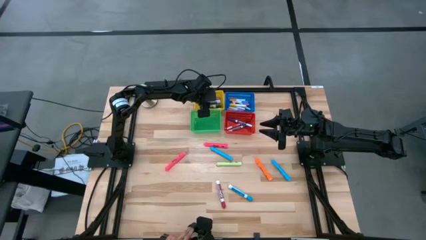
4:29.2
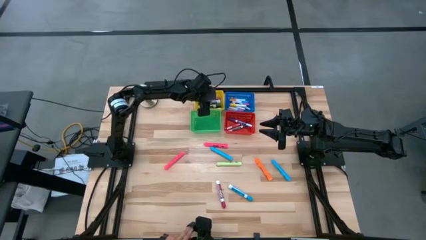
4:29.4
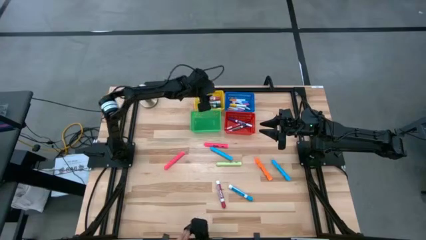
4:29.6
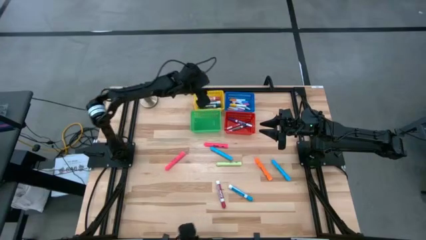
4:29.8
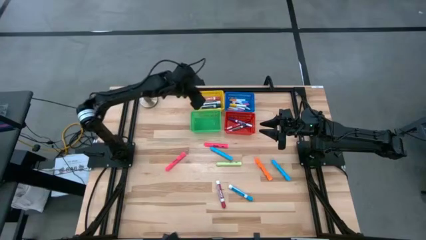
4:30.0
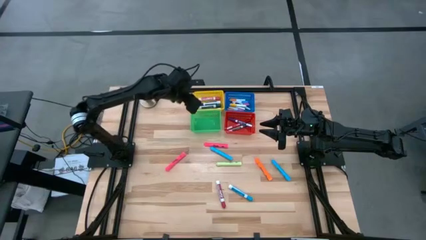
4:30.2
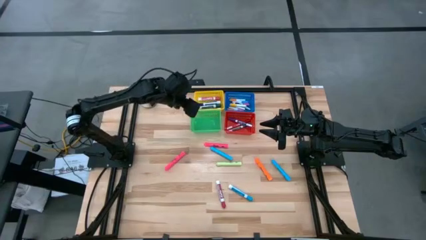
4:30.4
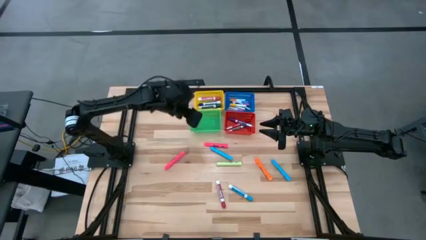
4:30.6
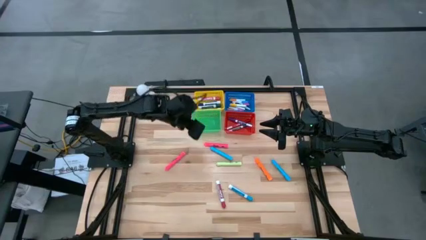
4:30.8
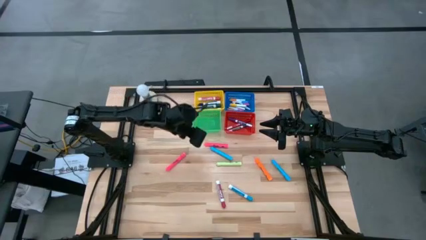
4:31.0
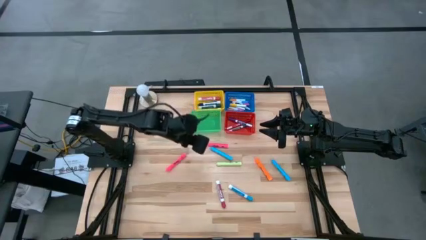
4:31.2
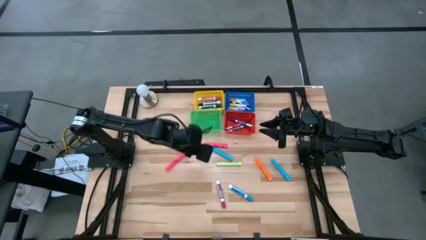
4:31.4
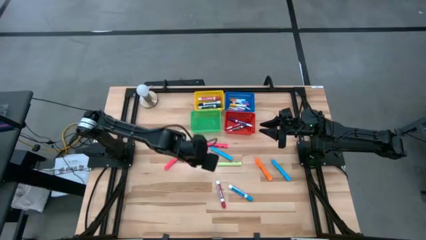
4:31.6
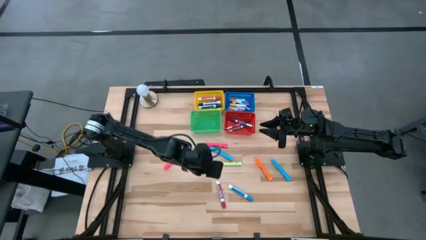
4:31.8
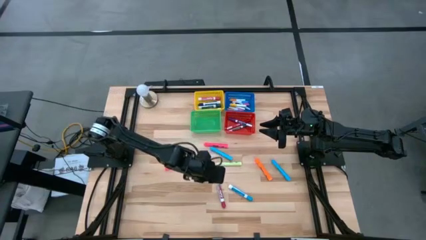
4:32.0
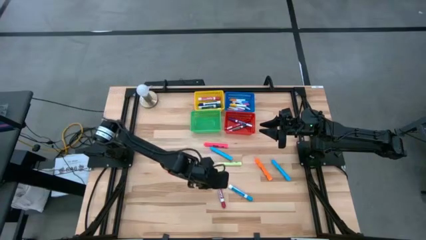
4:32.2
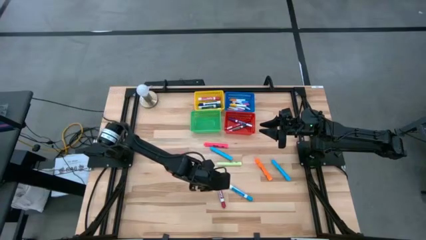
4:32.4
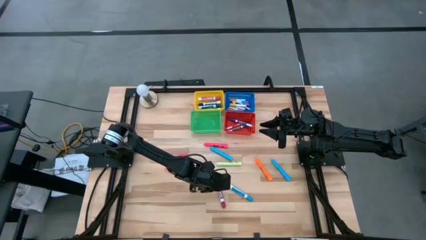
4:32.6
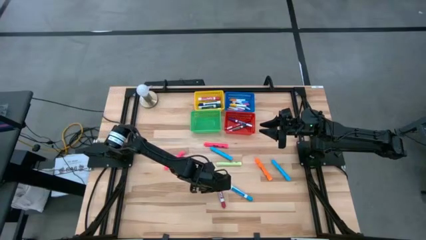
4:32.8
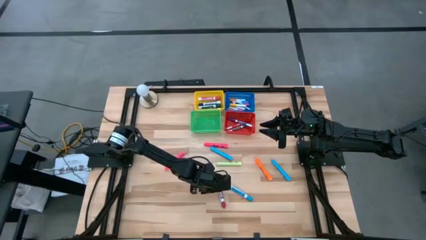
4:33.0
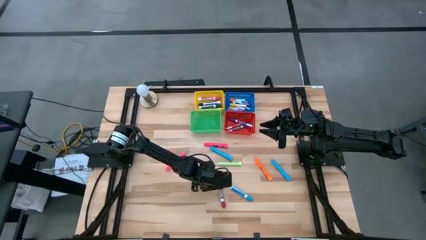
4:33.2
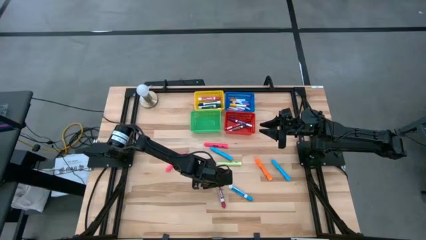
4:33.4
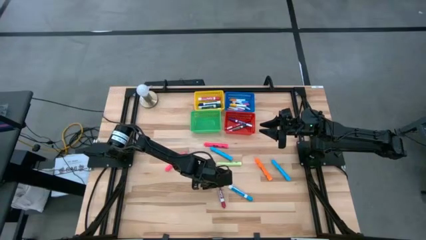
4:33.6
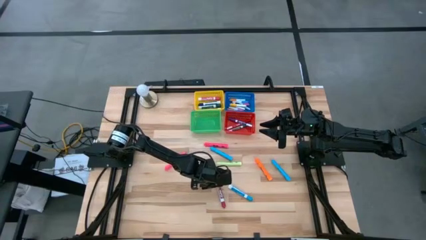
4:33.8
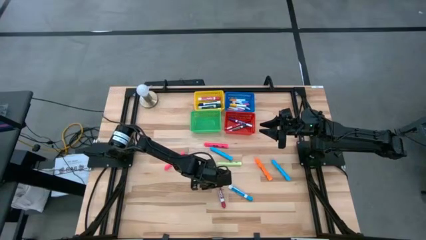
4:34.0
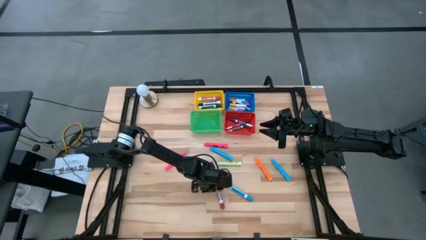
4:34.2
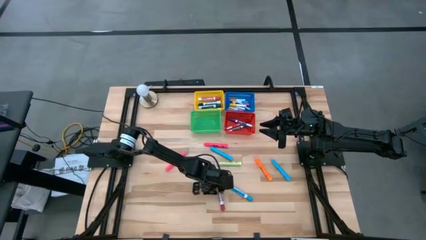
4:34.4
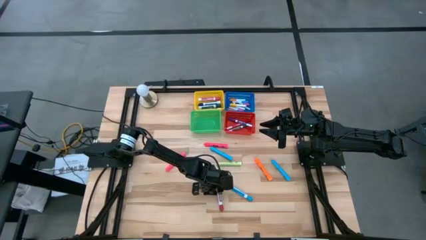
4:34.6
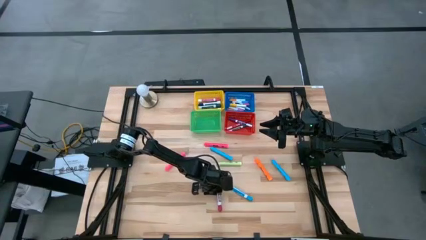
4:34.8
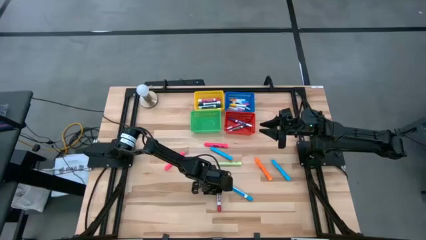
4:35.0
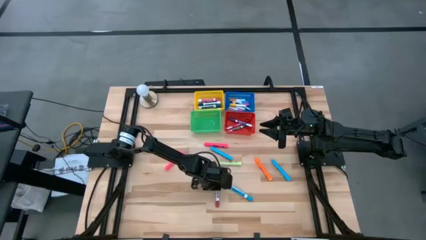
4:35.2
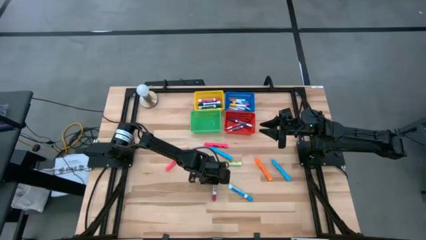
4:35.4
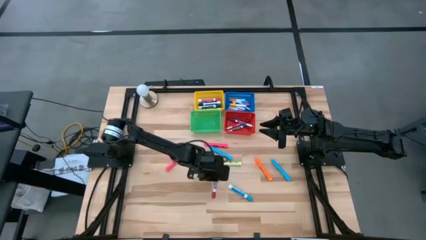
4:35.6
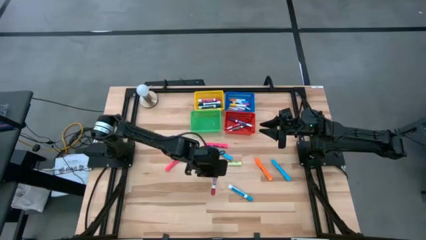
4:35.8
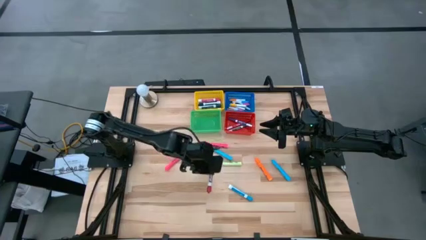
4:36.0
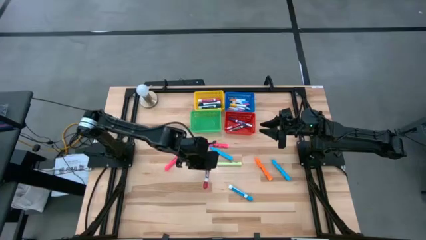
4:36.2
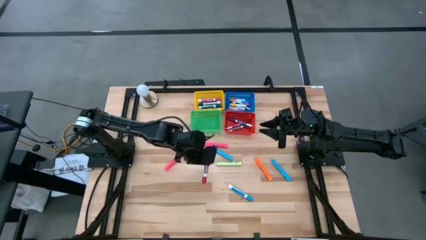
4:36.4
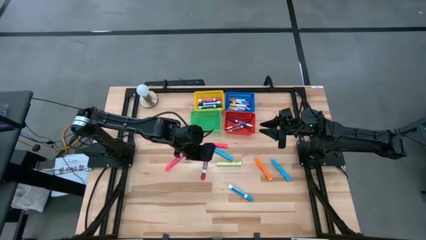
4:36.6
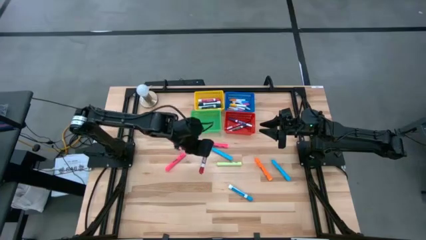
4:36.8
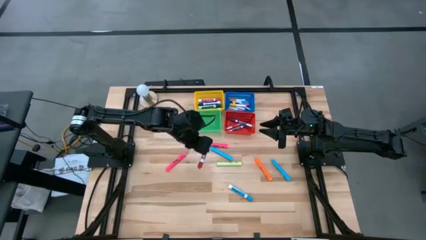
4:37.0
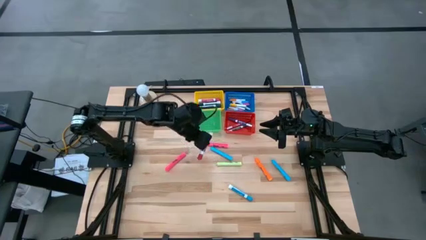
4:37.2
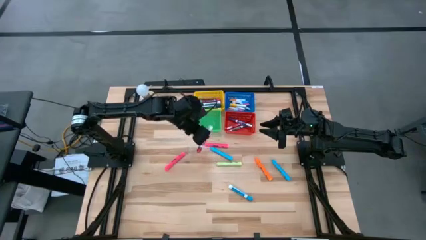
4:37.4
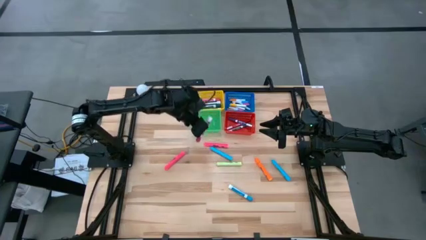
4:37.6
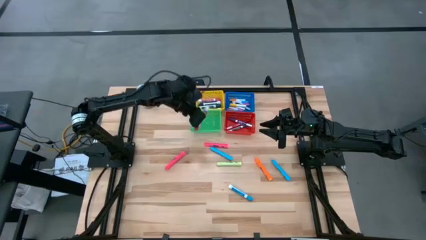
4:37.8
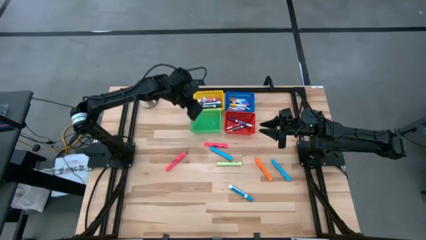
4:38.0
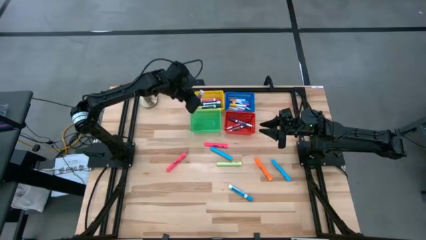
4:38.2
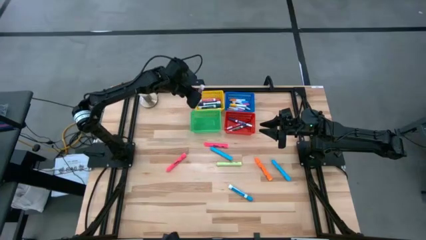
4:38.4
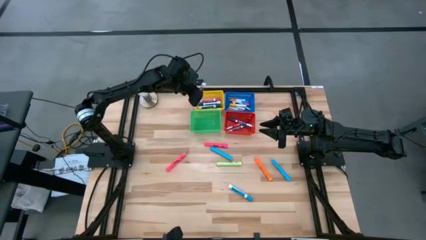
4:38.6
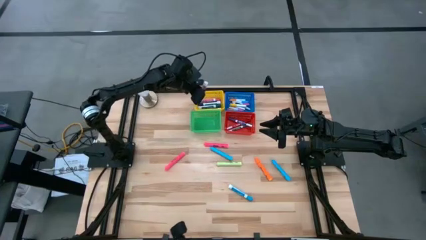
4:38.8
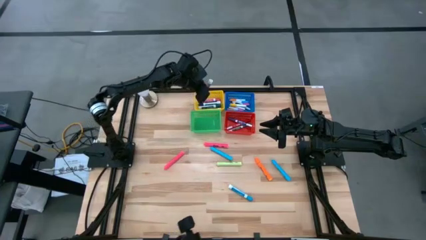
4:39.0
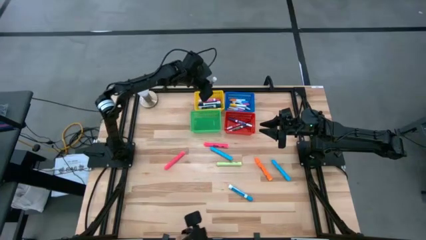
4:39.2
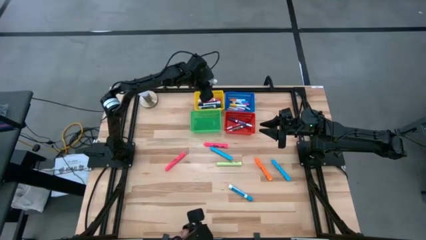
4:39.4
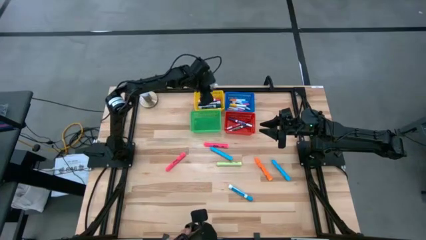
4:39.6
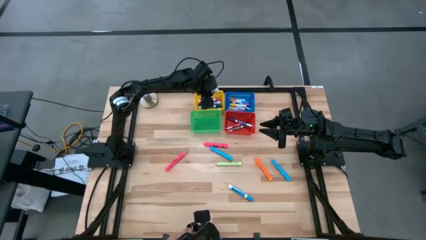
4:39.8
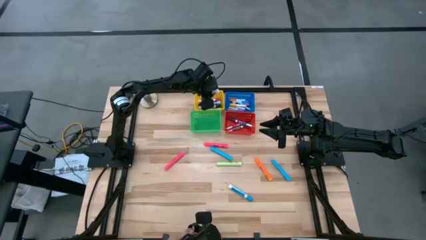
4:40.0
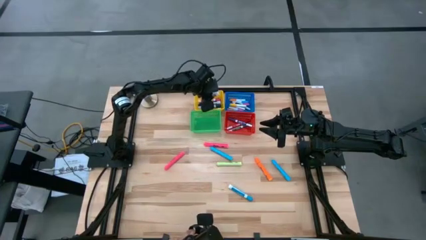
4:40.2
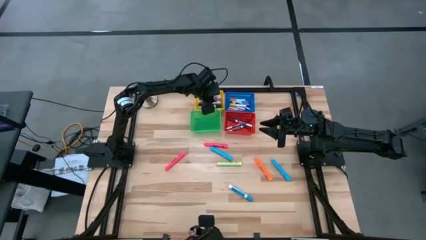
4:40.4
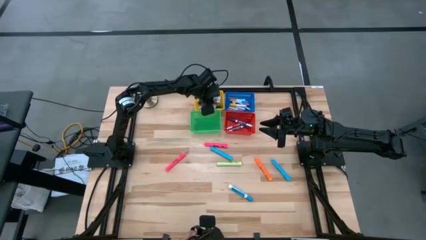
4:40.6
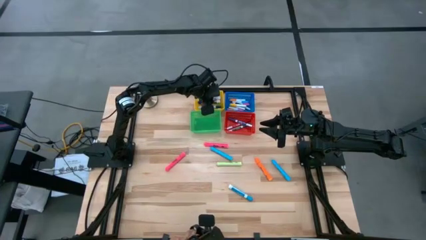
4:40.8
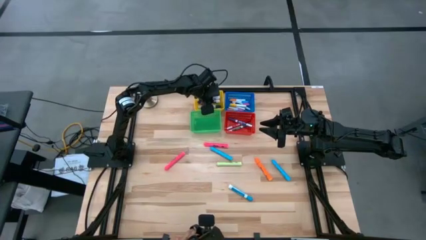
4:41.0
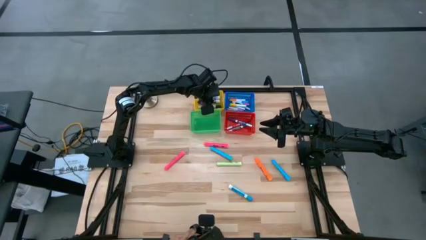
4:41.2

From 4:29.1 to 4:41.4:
Task: Pick & Place Markers
Put the large red marker pen into the yellow bin
